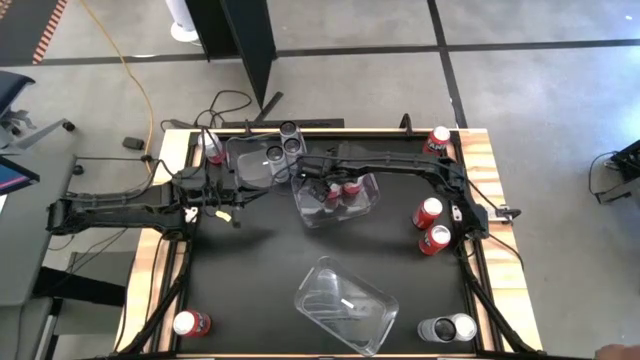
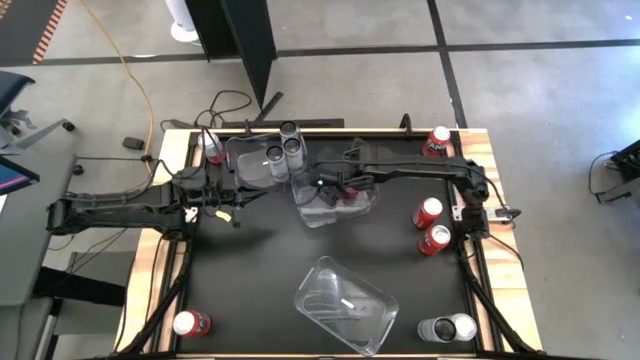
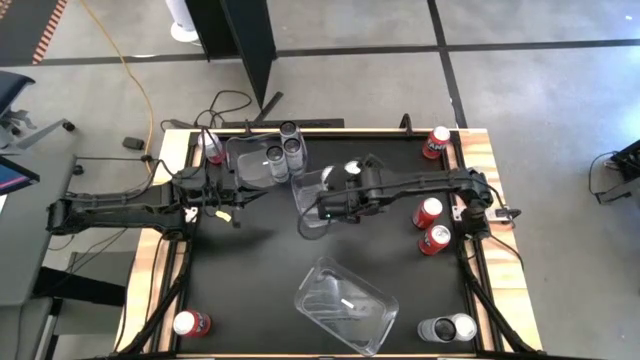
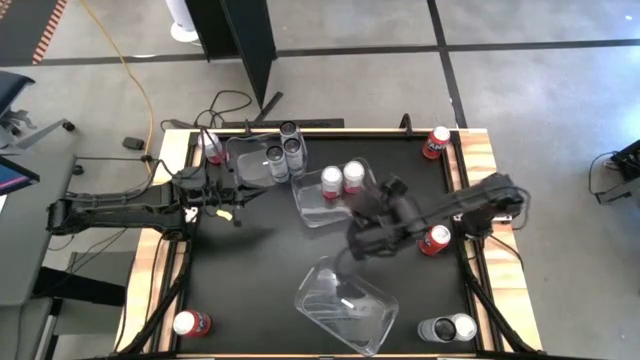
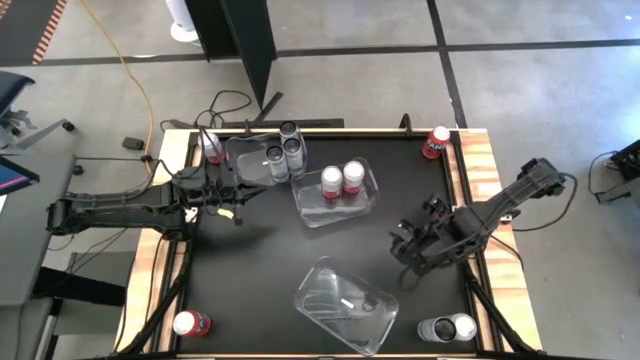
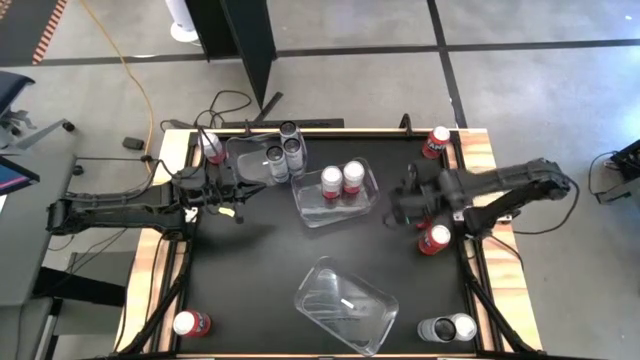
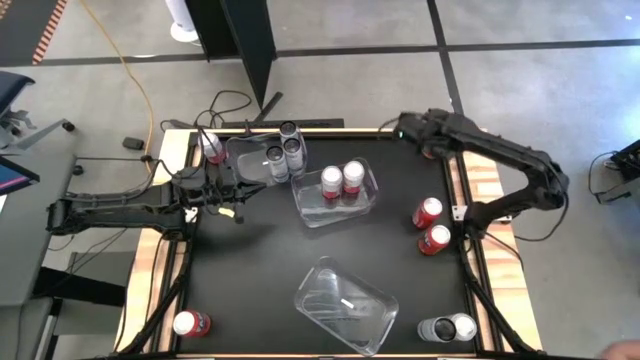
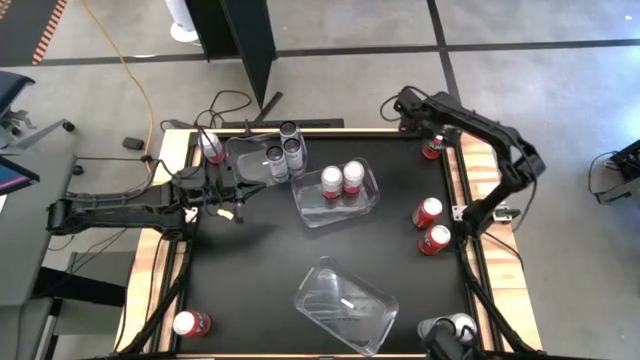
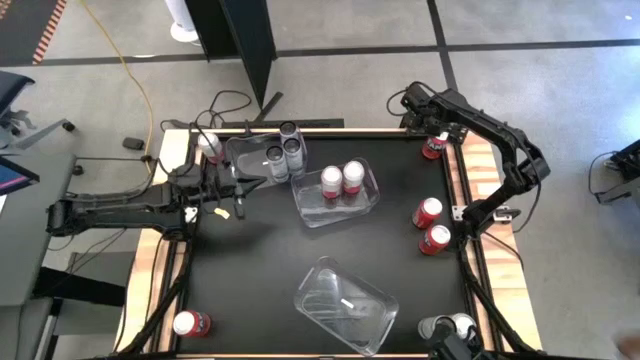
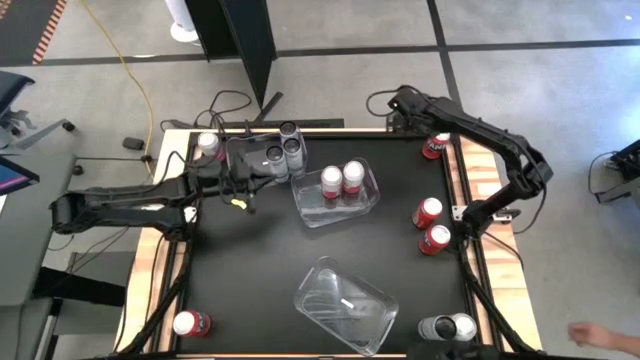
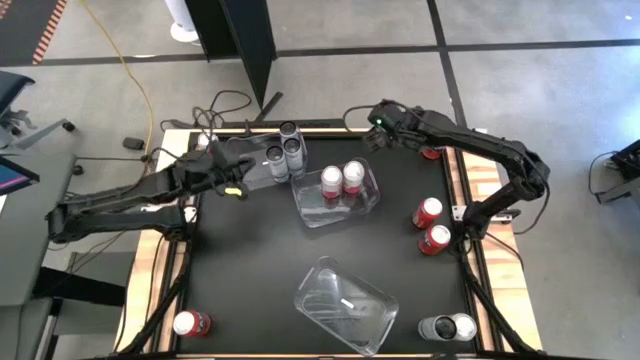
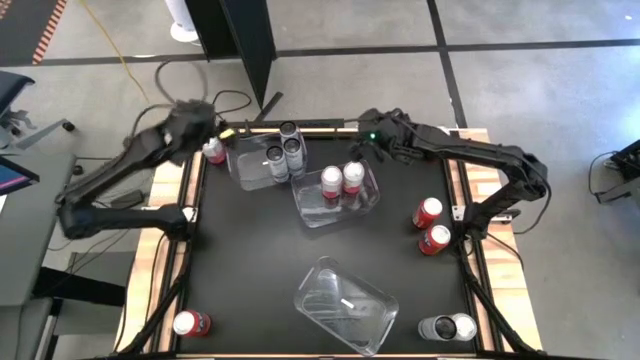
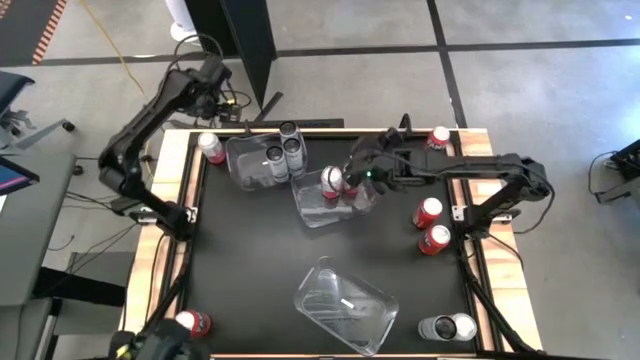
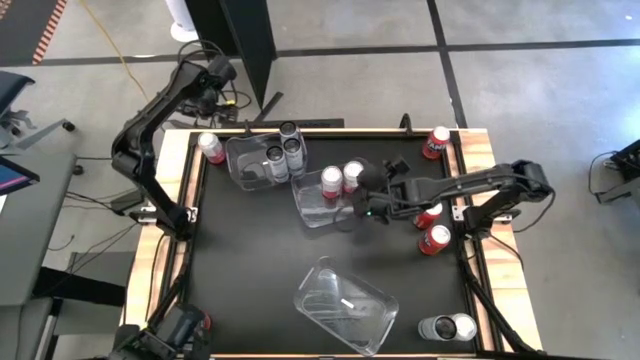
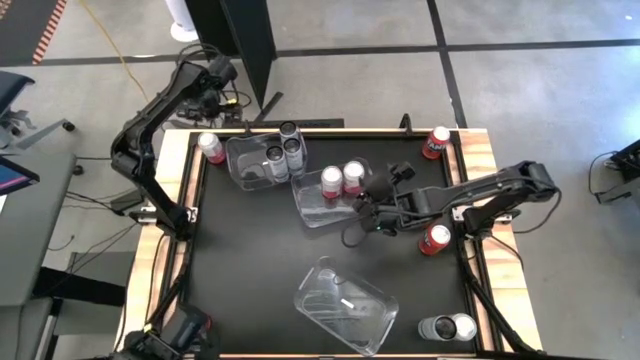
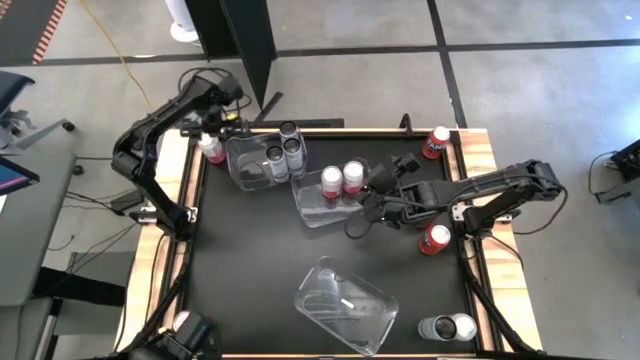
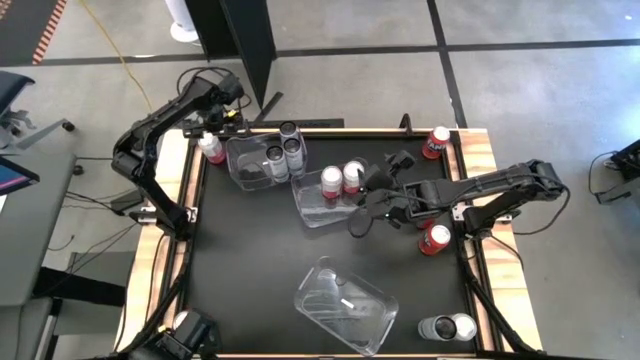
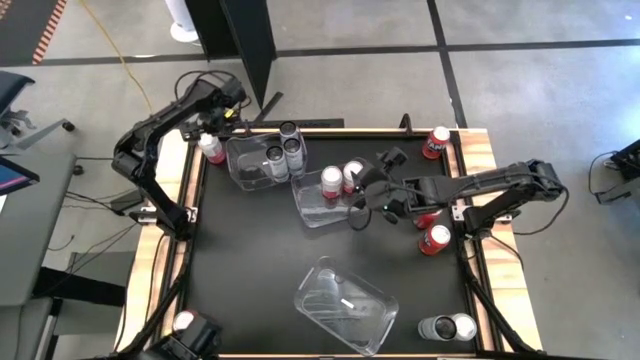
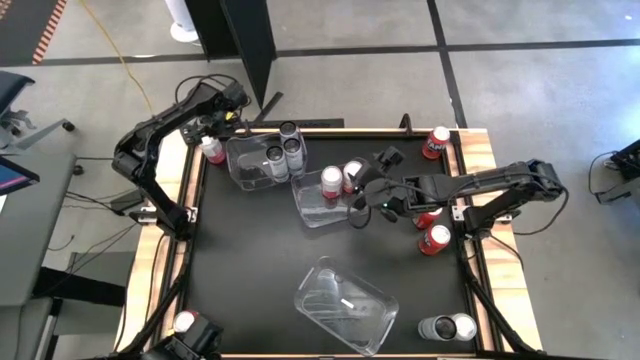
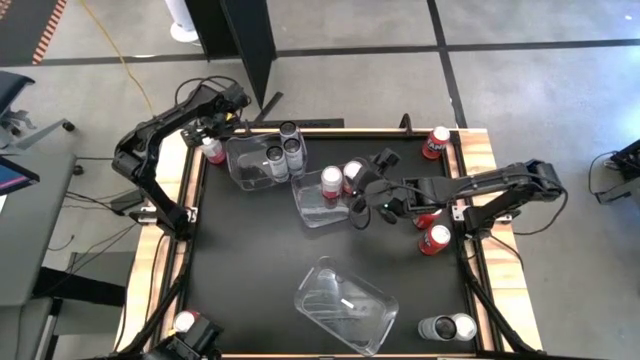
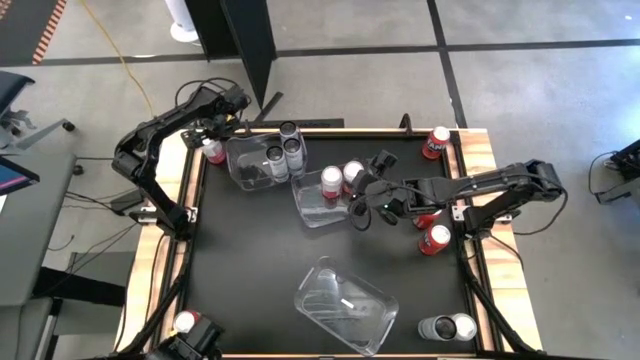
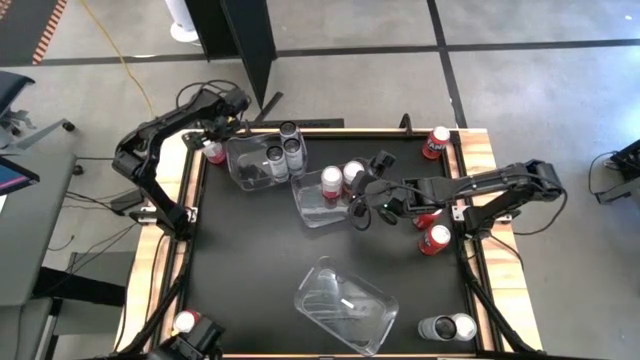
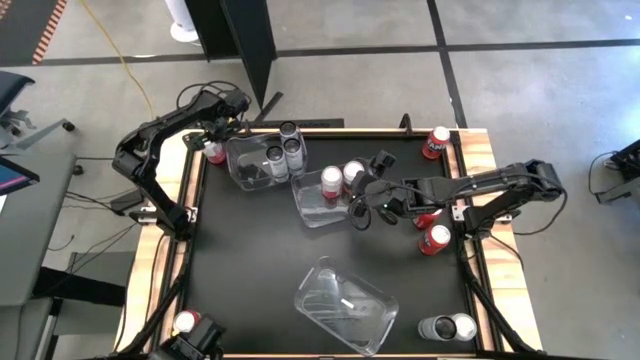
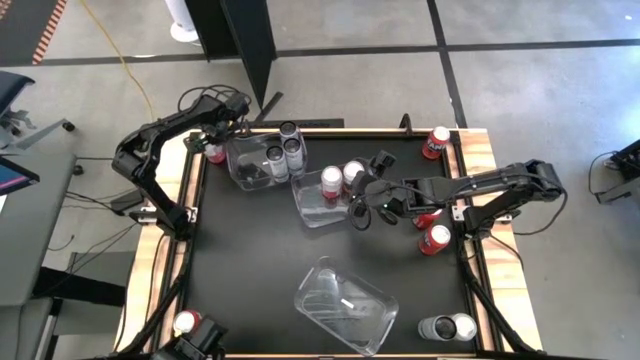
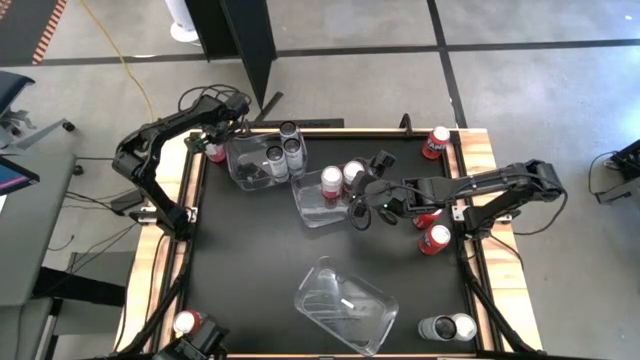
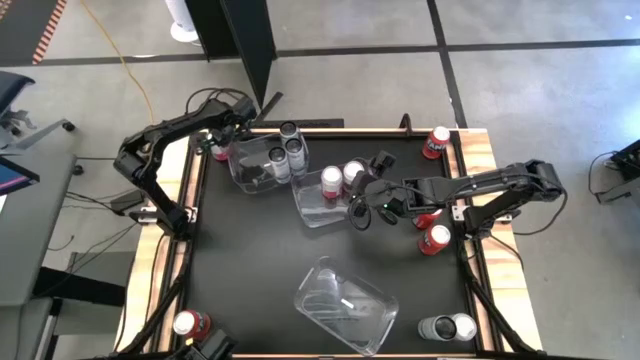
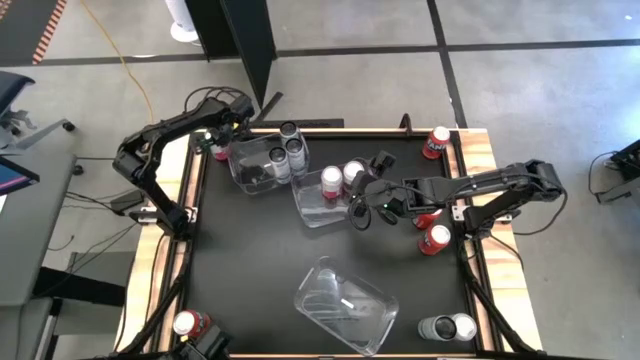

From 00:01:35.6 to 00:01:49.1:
Task: Sort soda cans
Put the top left pink-white soda can in the middle transparent bin
